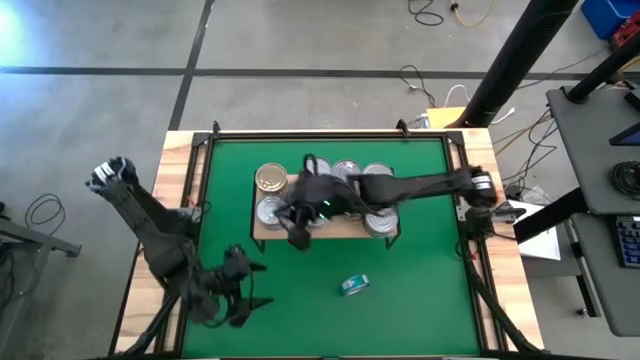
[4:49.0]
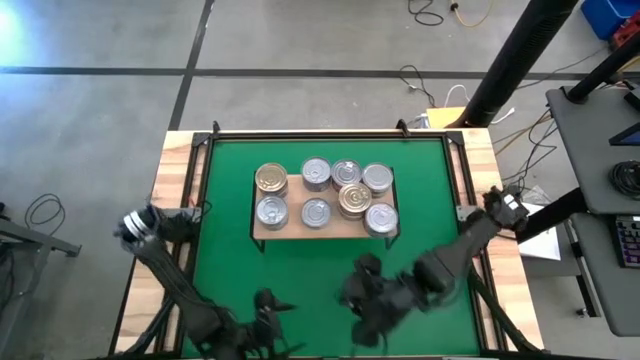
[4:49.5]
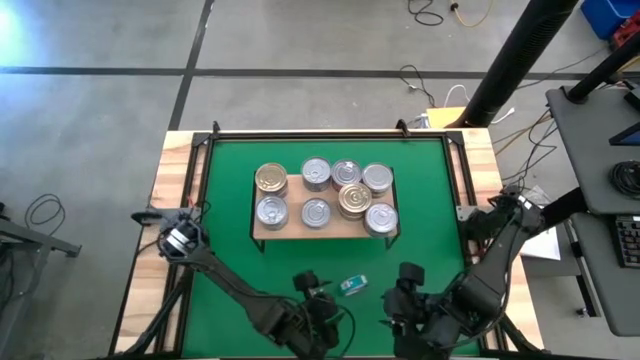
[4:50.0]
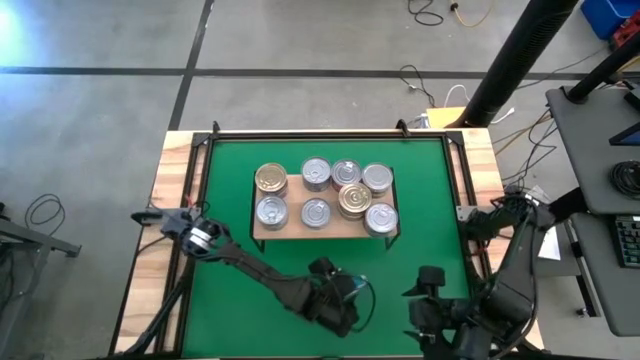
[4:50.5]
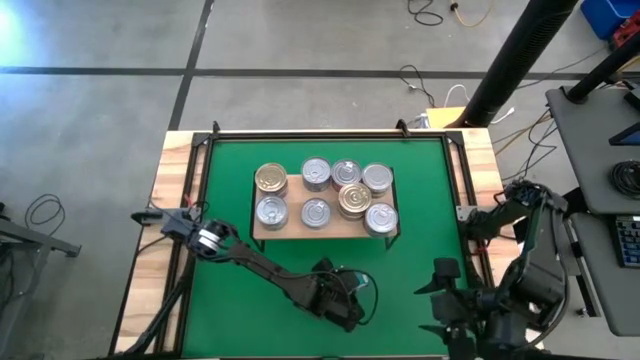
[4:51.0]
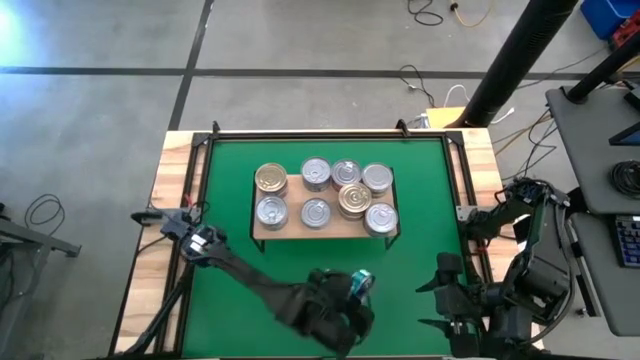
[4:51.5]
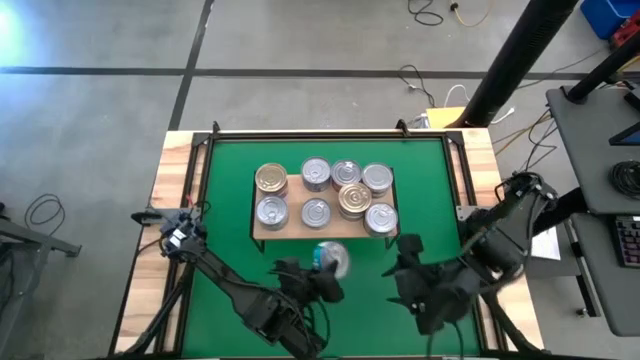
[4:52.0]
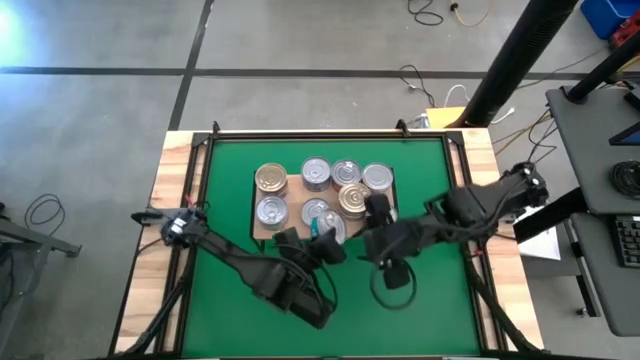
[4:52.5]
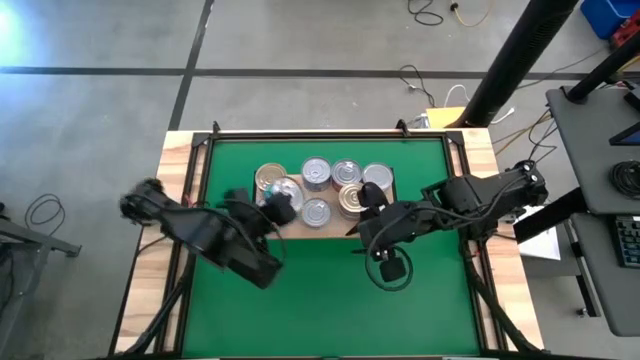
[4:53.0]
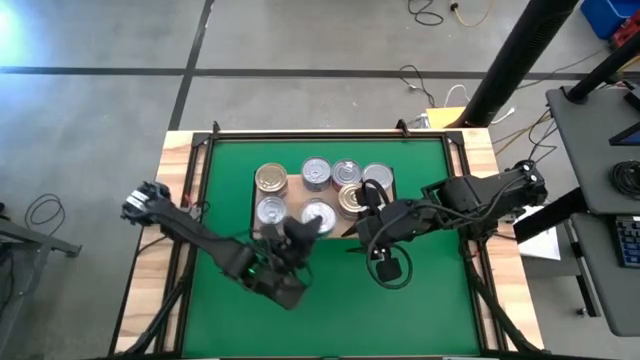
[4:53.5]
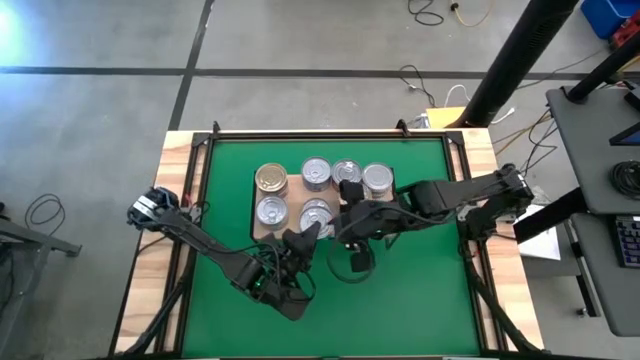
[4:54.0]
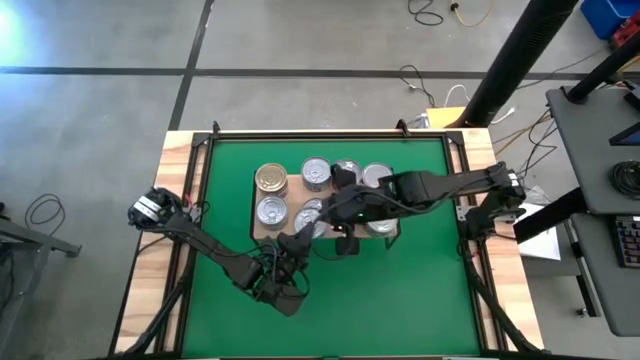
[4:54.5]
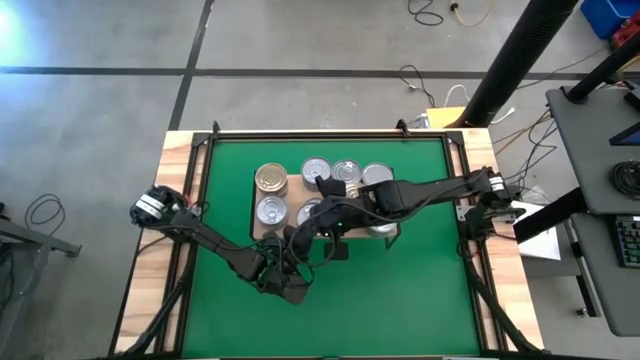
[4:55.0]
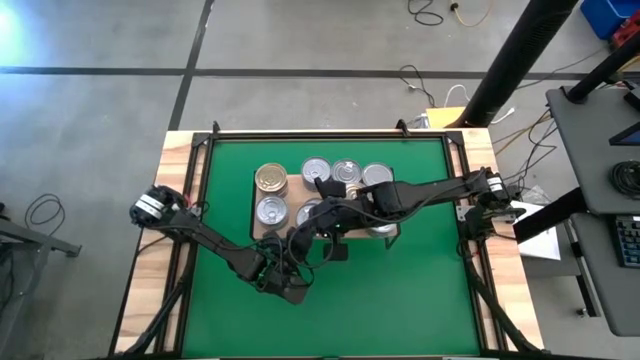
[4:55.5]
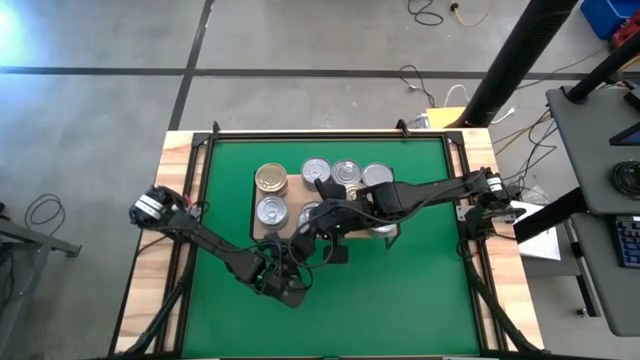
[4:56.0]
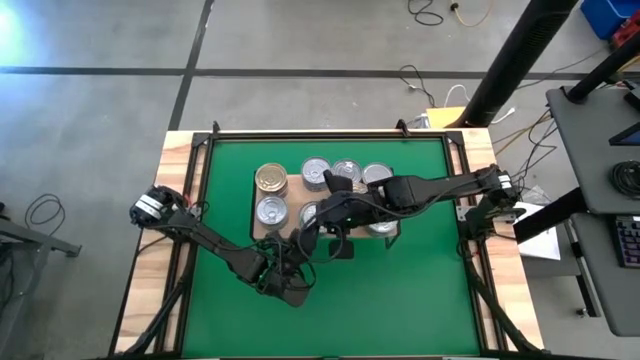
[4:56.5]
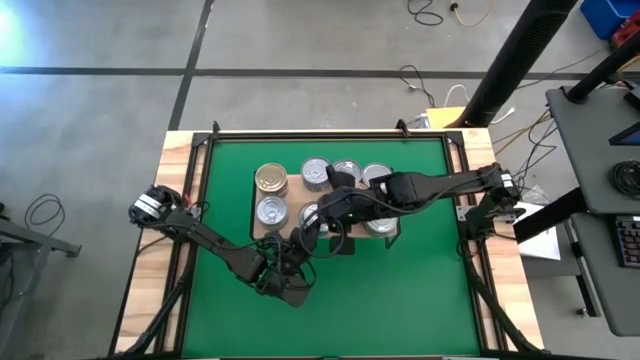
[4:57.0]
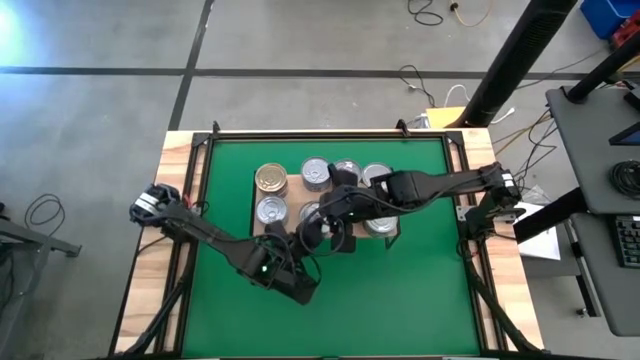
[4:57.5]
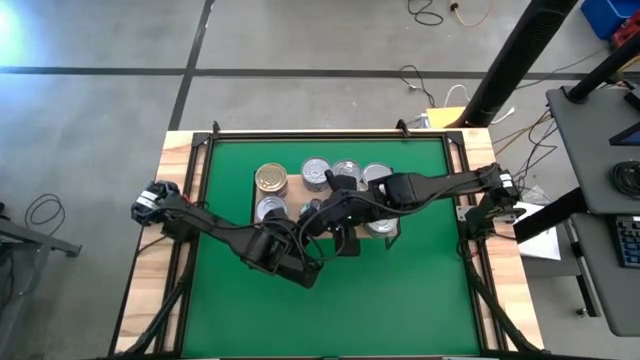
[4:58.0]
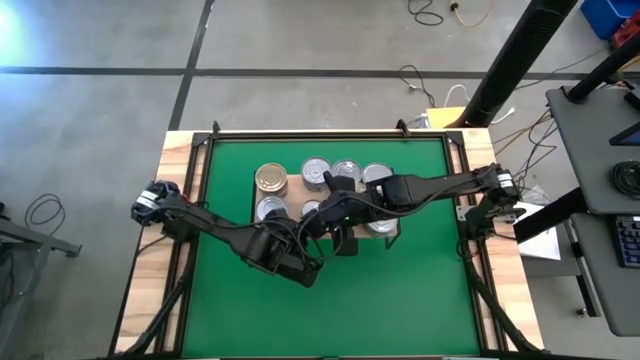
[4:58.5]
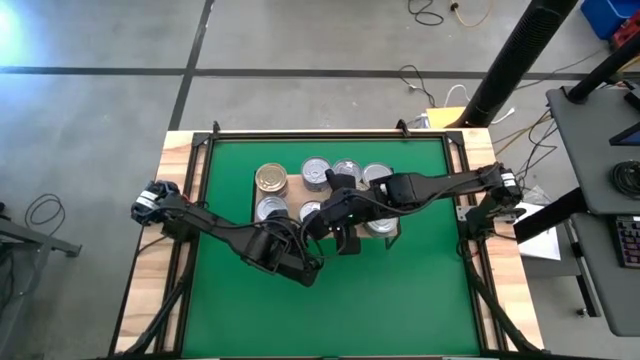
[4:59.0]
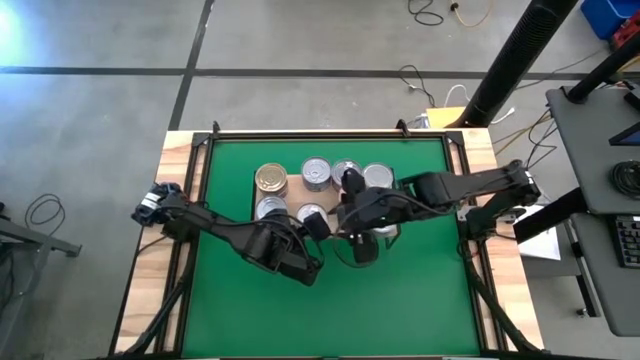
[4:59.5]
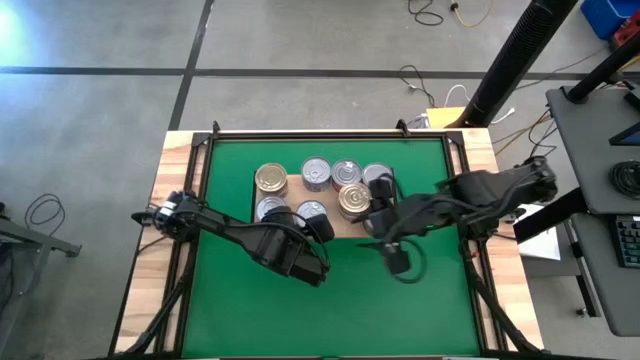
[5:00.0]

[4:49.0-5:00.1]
Task: Stack canned seafood by type on shelf
Stack the green and blue tuna can on top of the green and blue tuna can on the shelf

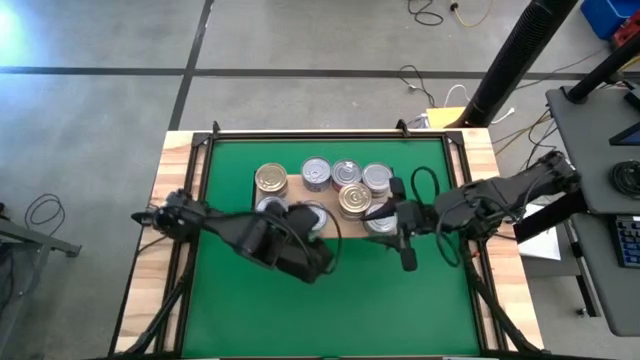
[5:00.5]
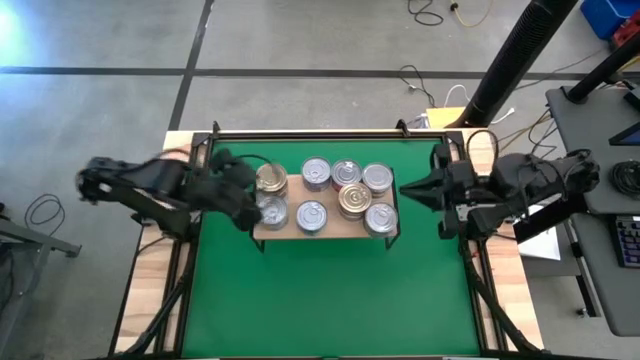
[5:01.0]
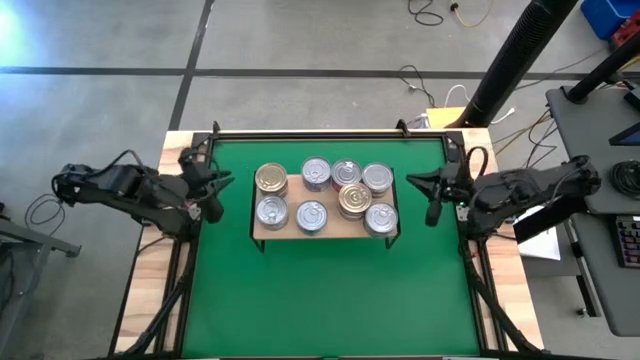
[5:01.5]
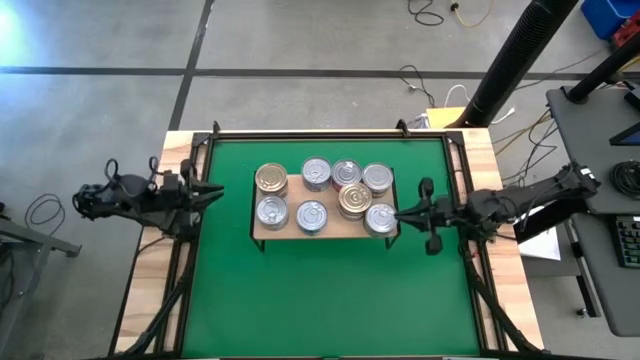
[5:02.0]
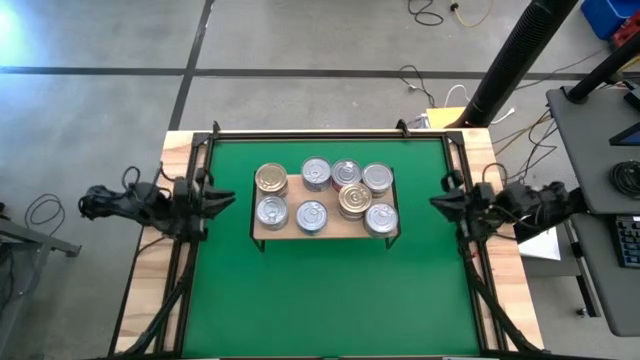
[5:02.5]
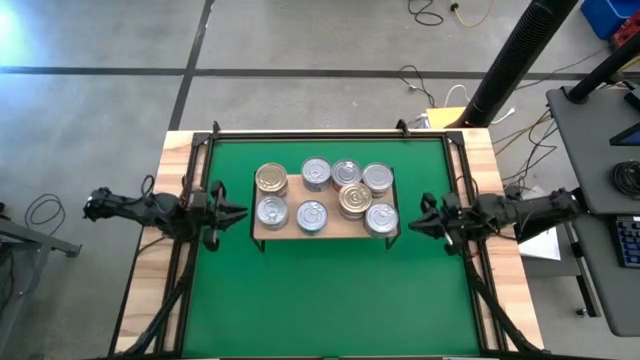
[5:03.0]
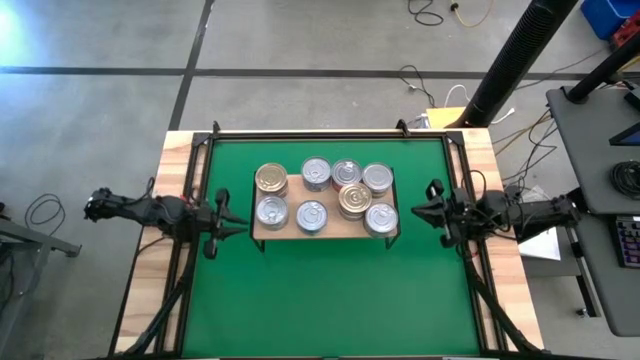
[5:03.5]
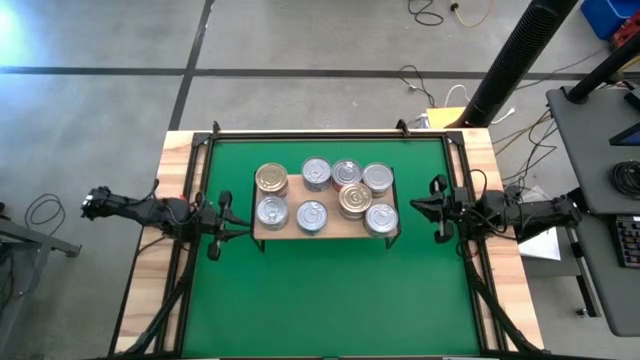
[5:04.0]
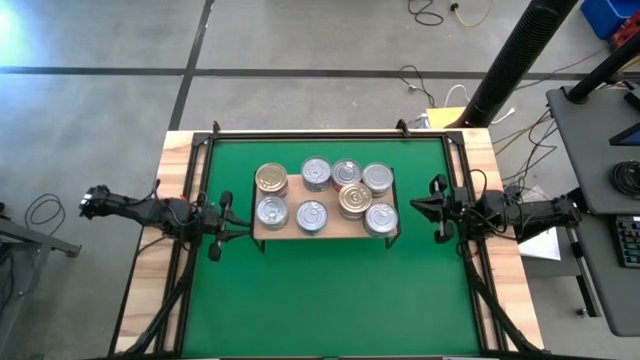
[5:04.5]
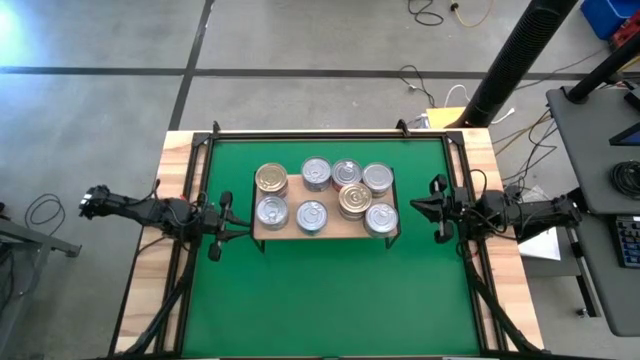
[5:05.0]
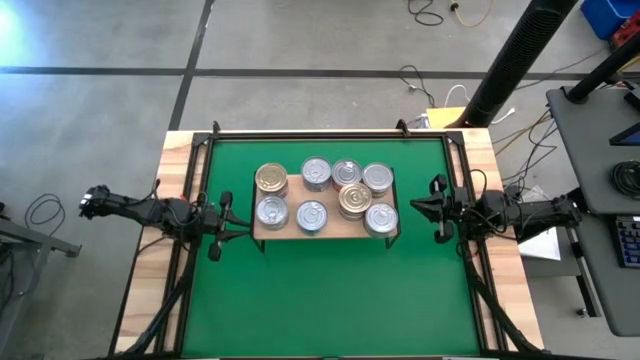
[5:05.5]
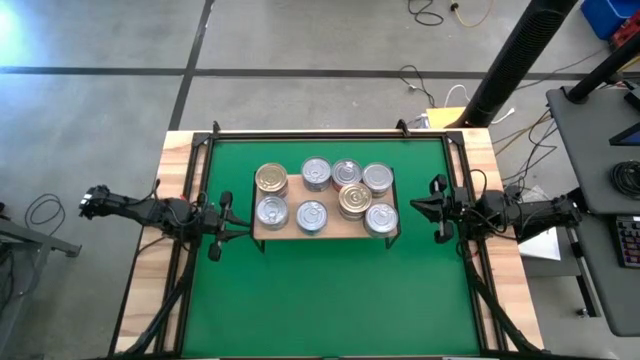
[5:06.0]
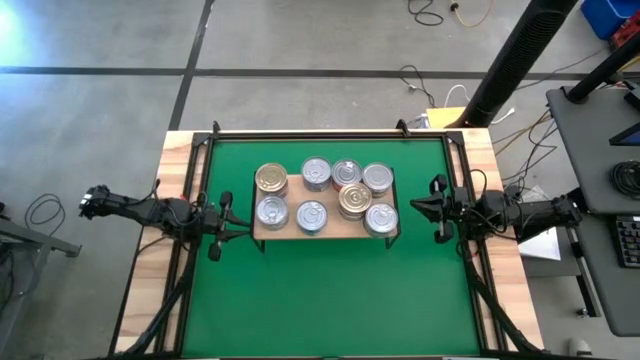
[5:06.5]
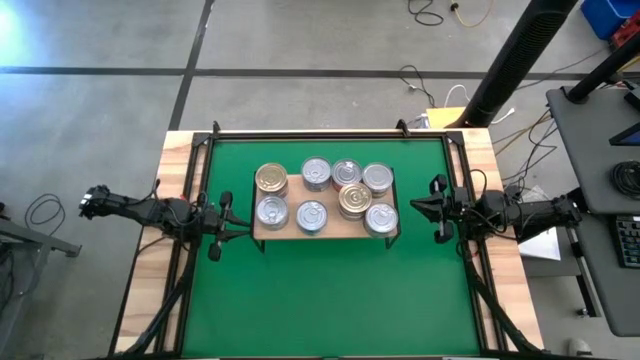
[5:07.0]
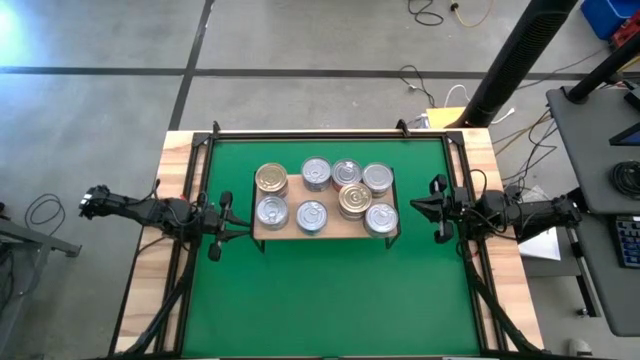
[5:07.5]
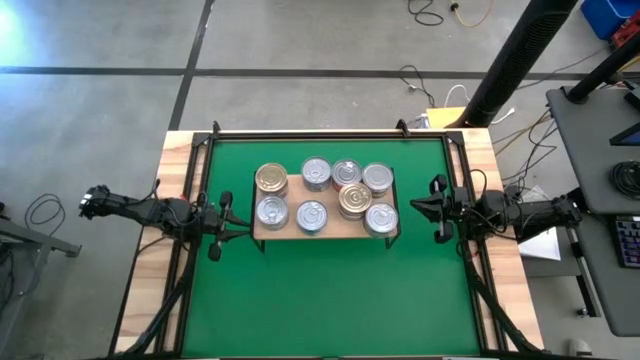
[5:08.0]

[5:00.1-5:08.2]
Return to Home Position
